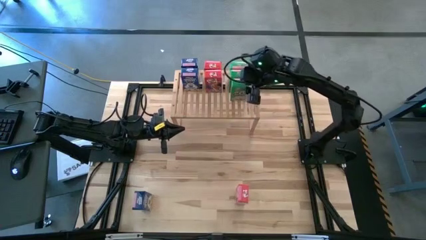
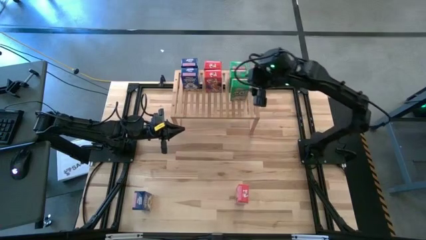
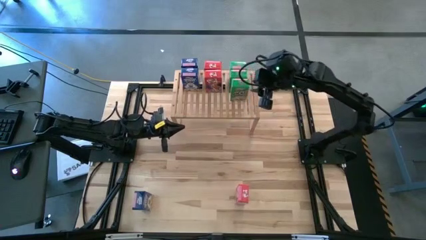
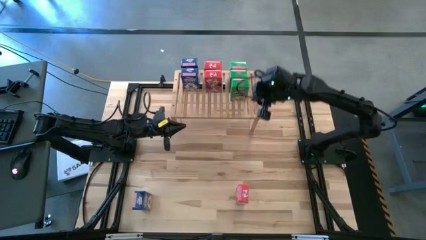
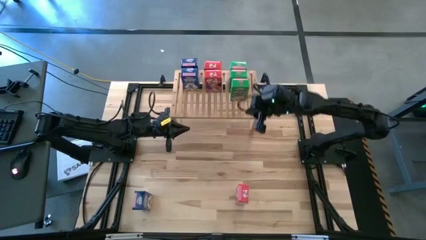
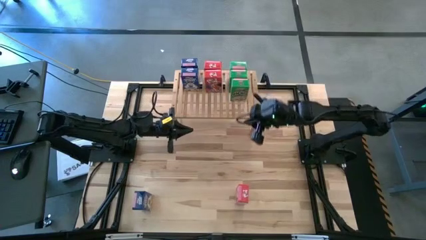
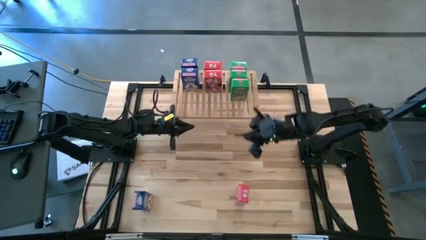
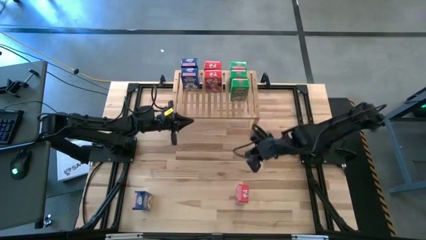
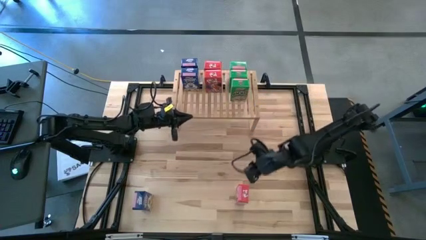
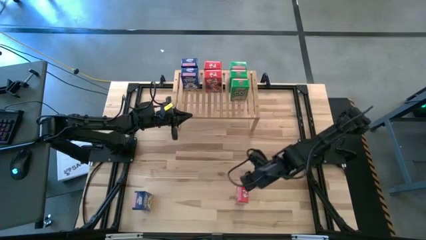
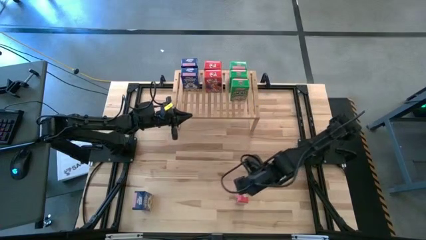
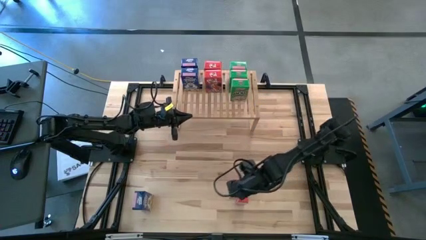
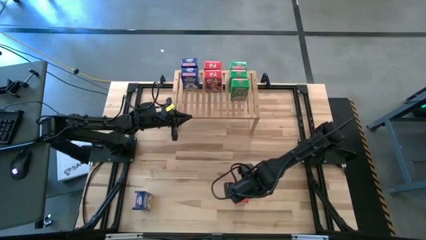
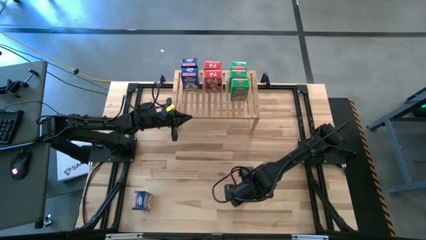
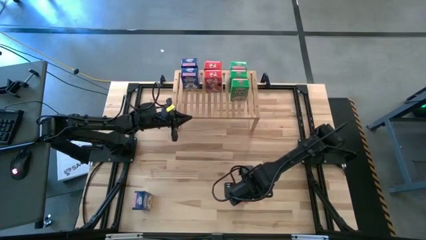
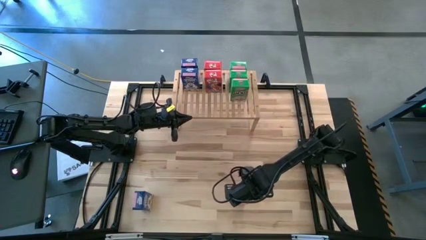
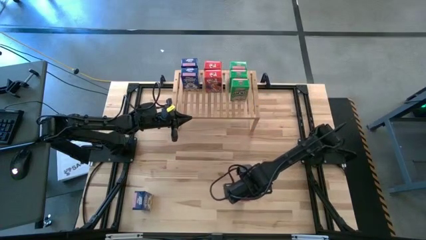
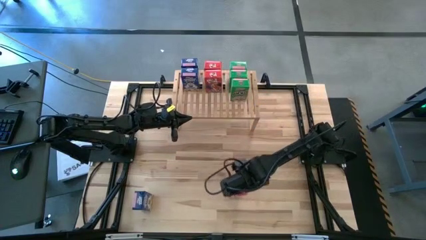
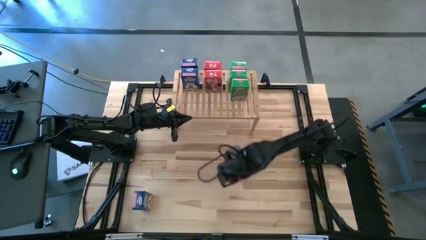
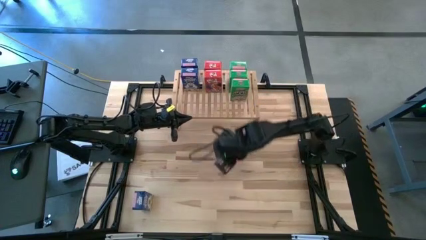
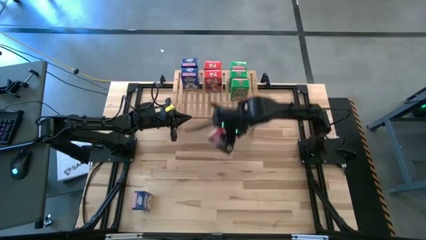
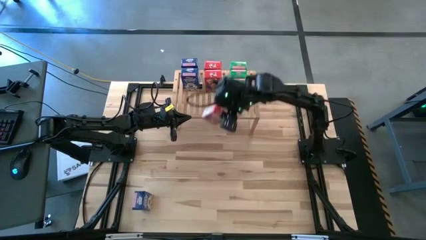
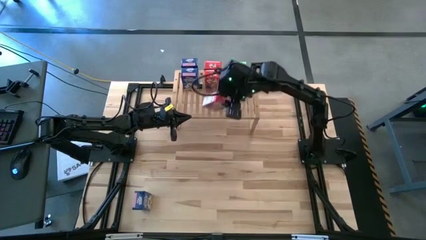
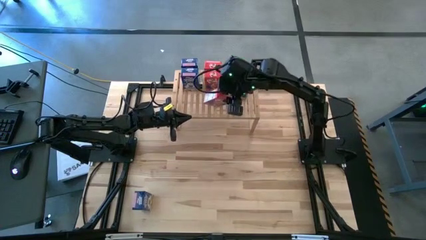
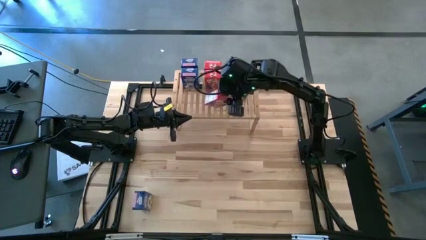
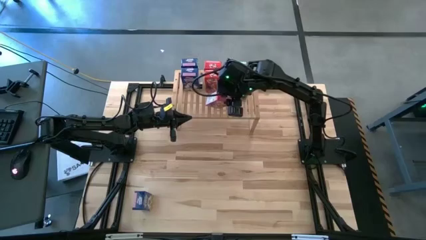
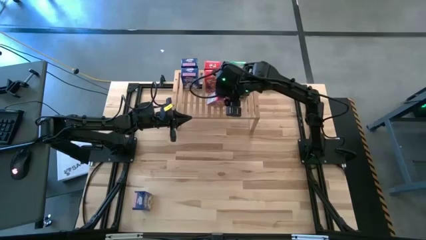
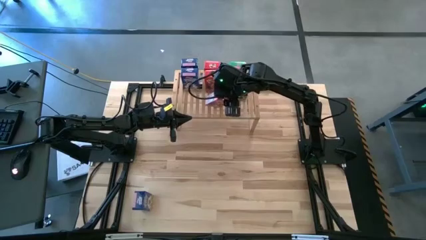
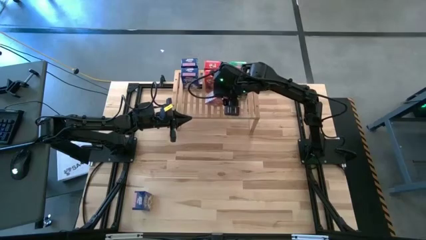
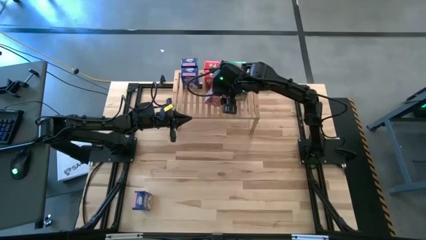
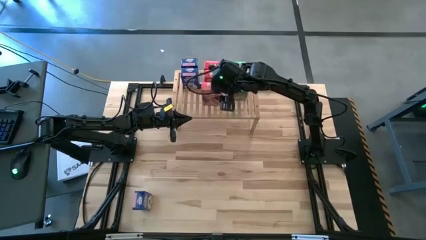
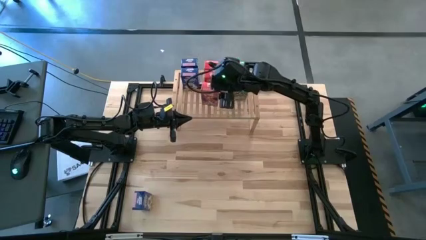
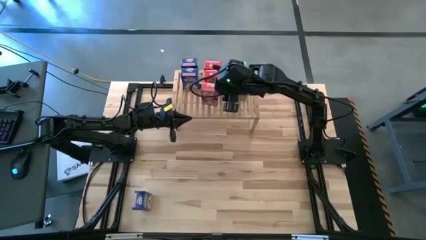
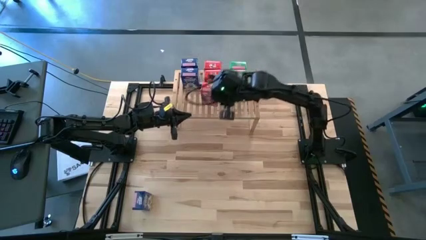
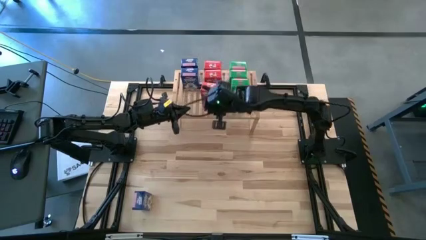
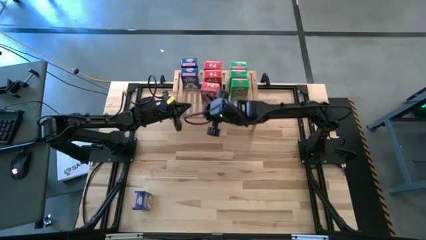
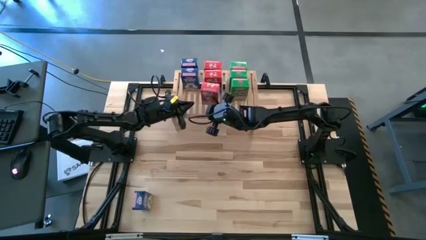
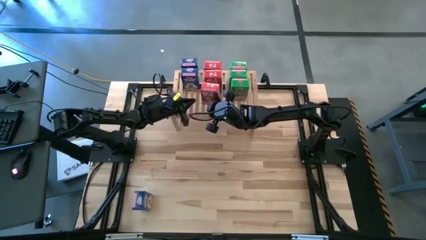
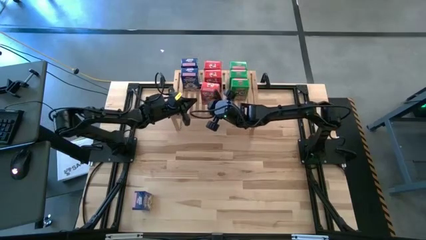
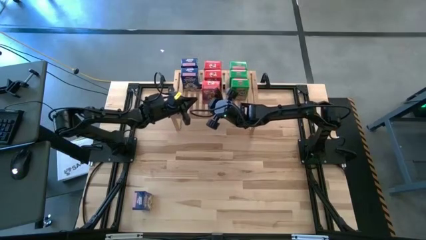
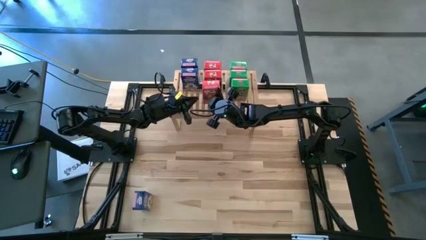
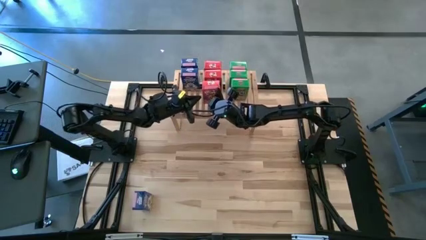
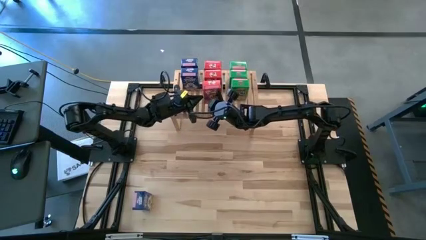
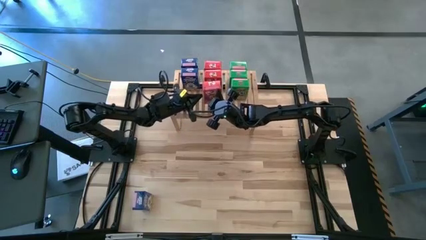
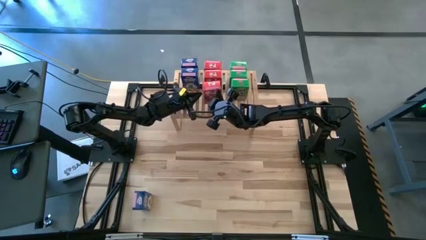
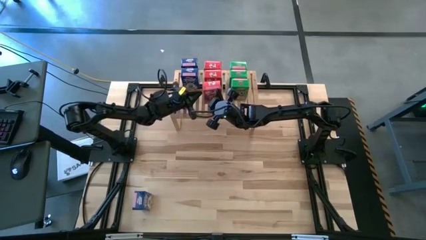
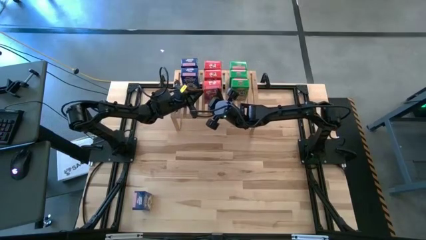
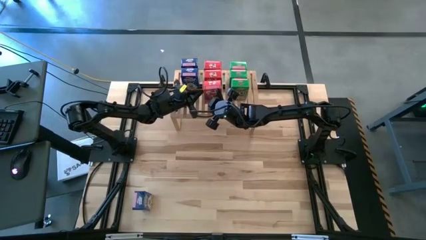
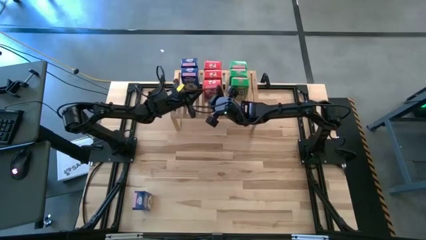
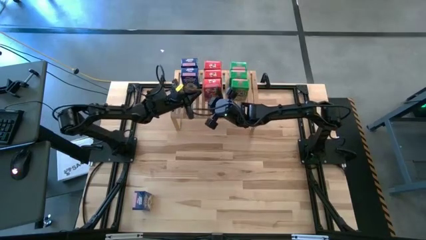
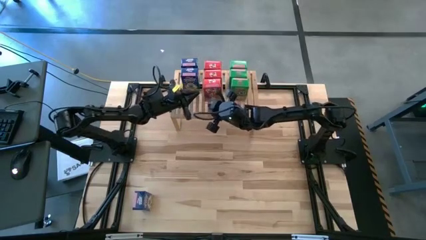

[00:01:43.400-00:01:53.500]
Task: Stack cereal on shelf
Put the red cereal box on the shelf and align it with the other red cereal boxes

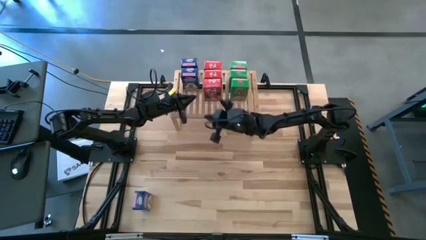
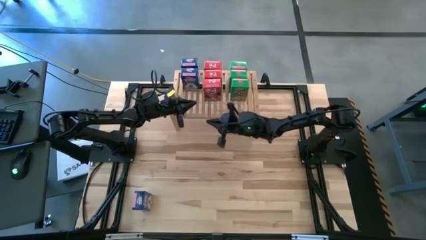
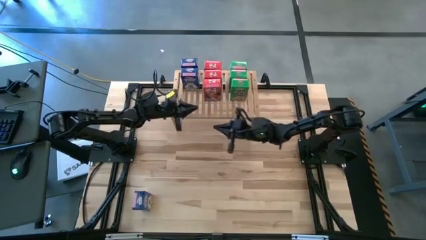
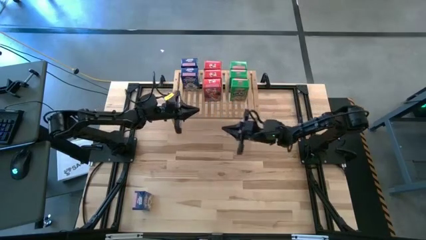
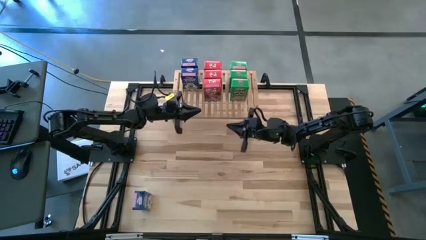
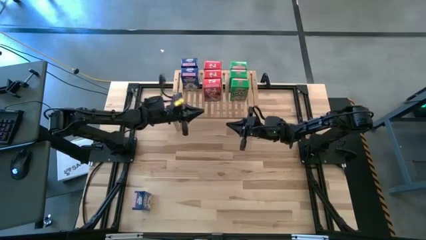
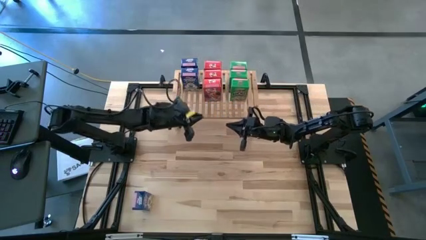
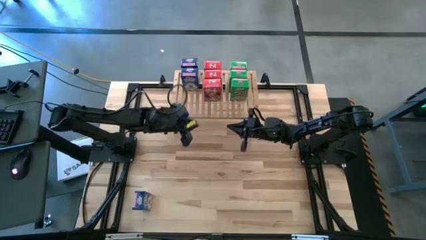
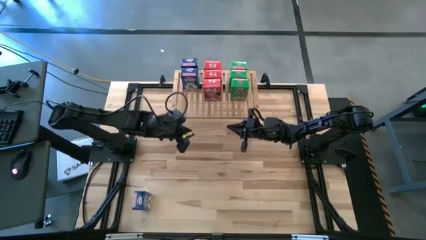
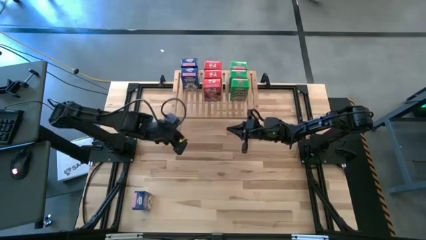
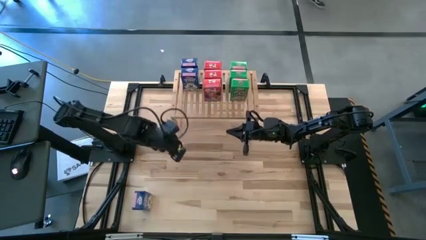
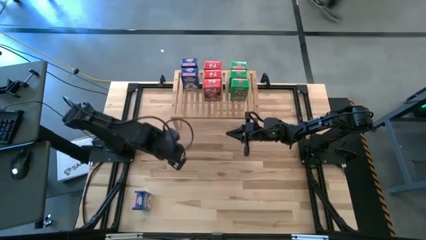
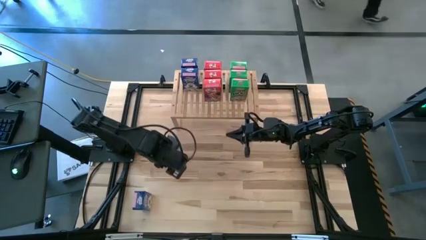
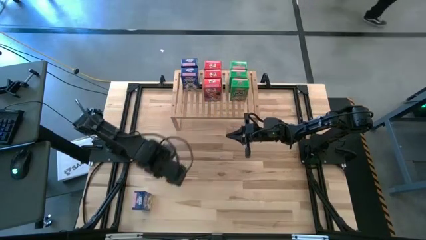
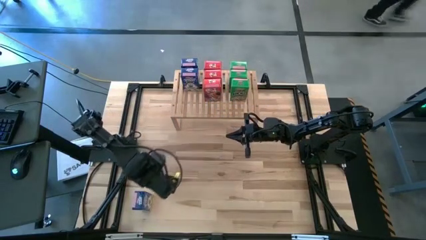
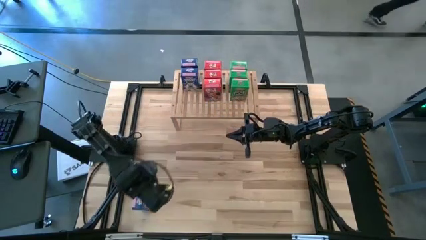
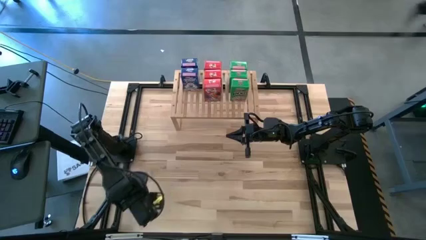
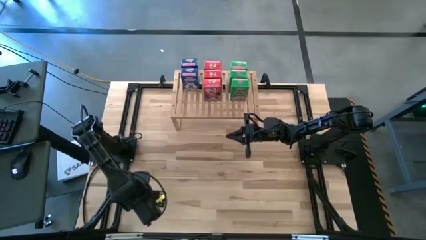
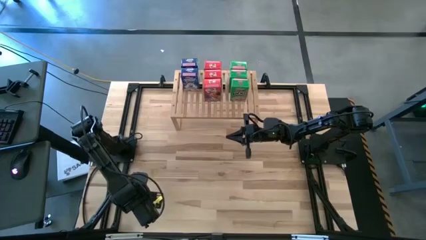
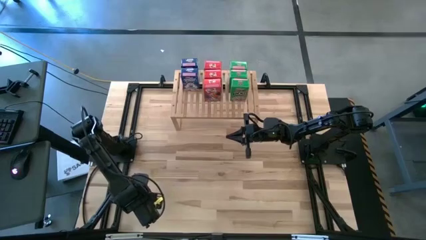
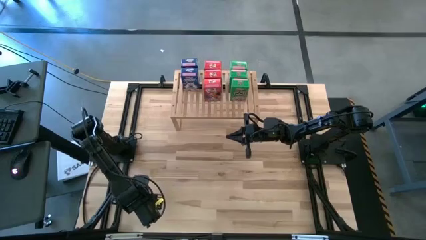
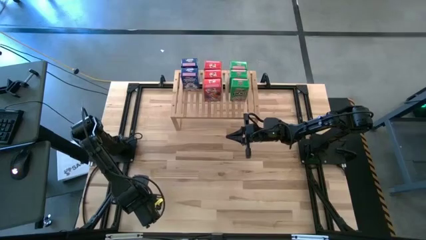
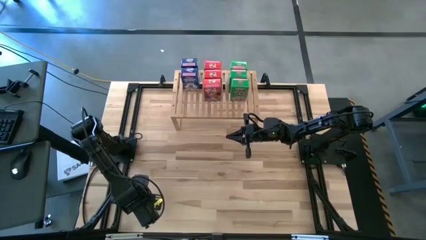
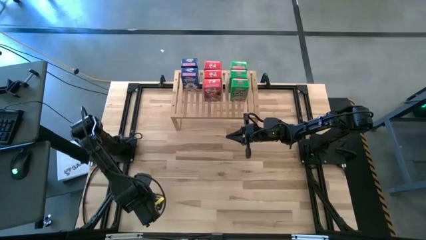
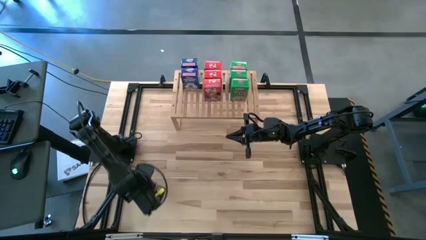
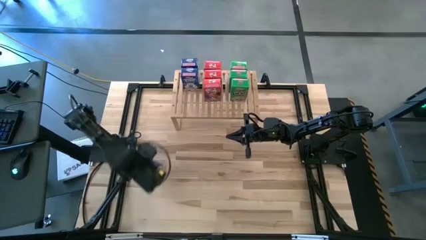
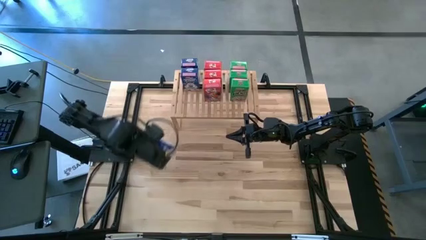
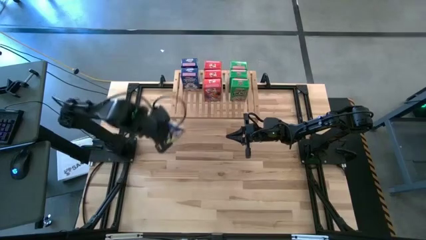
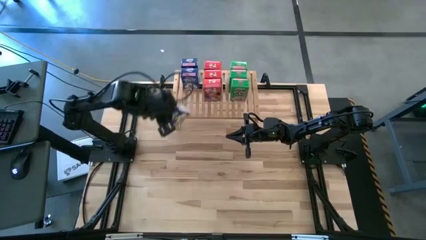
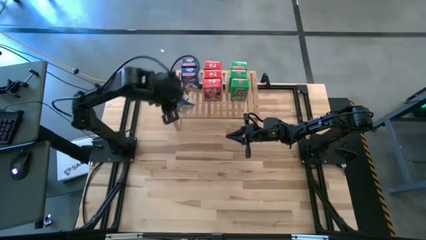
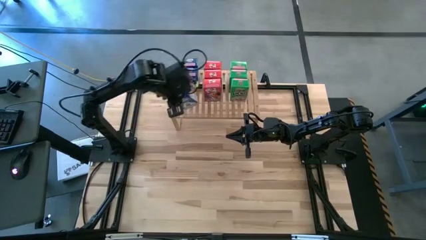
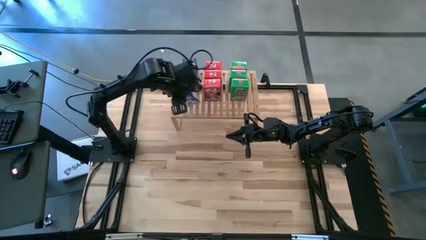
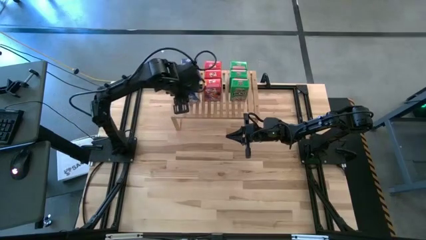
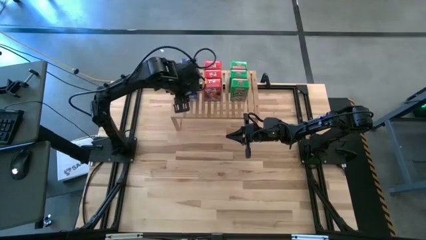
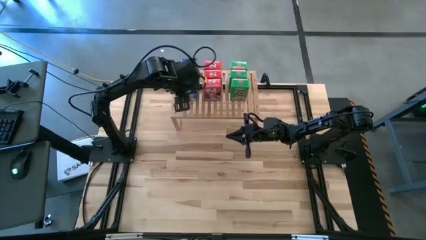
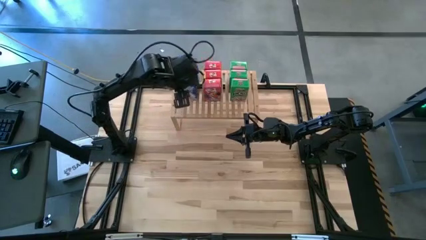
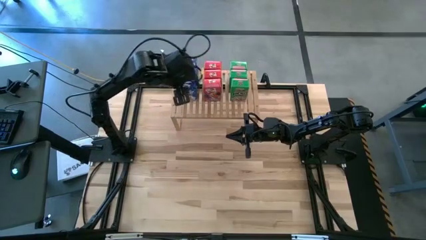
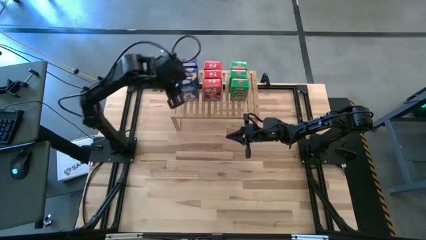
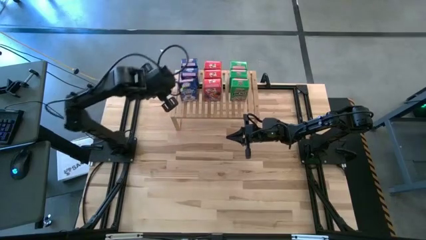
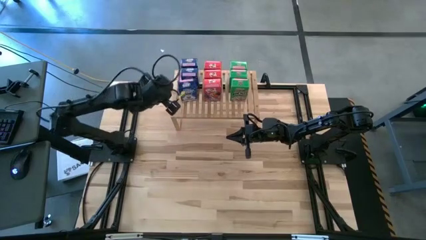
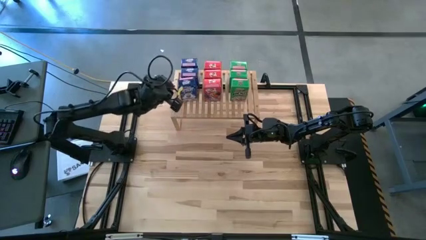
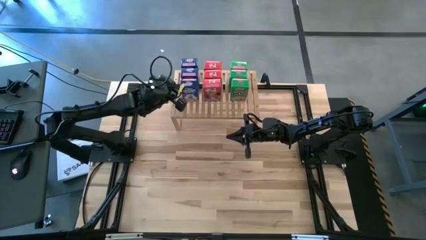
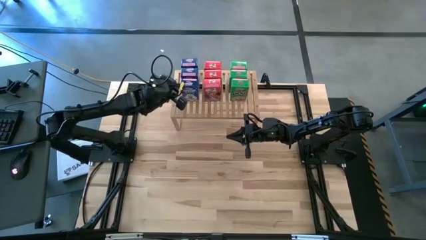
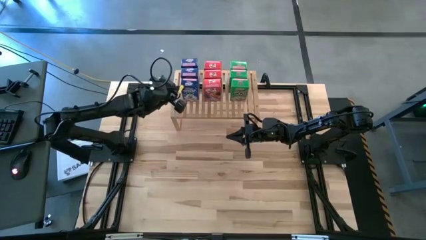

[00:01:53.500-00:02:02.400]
Put the blue cereal box on the shelf aligned with the other blue cereal boxes
